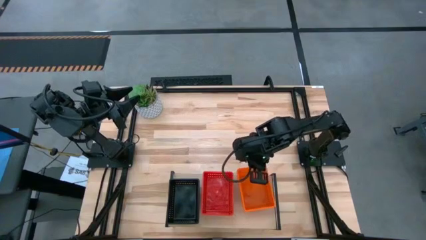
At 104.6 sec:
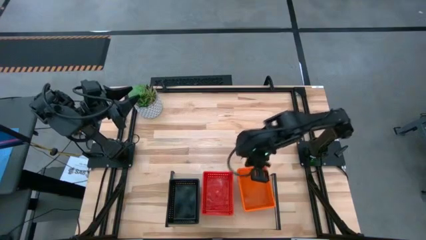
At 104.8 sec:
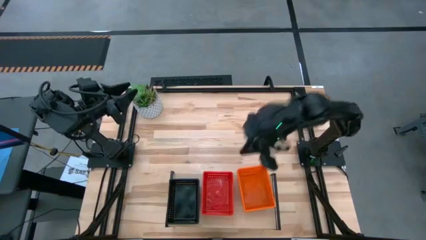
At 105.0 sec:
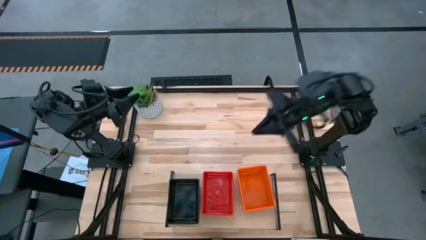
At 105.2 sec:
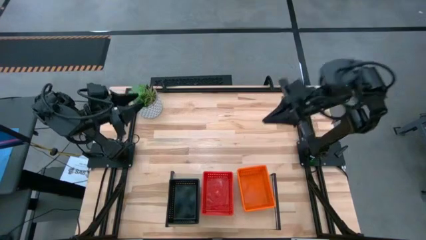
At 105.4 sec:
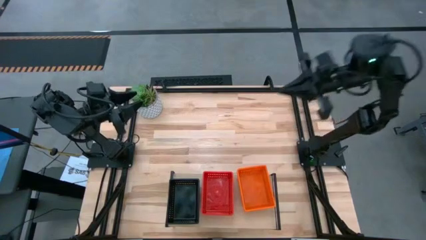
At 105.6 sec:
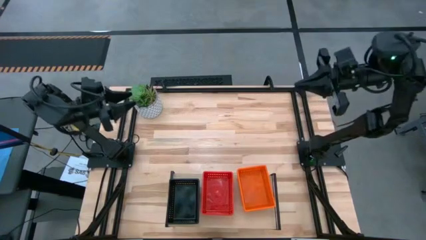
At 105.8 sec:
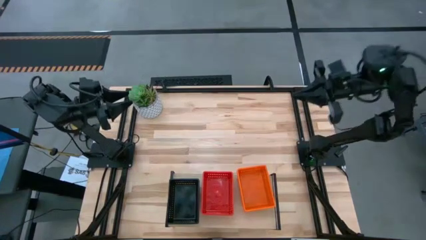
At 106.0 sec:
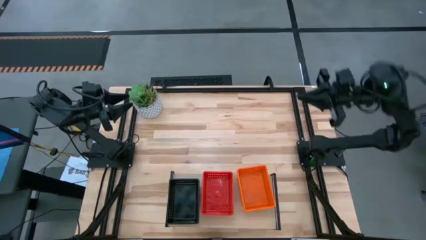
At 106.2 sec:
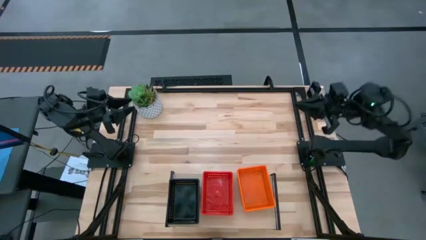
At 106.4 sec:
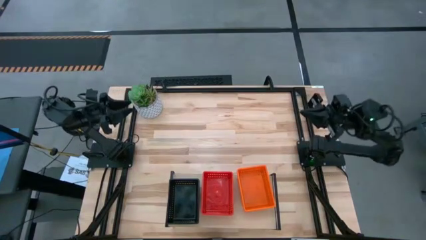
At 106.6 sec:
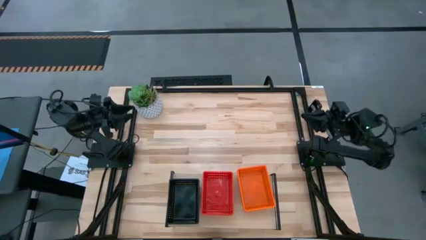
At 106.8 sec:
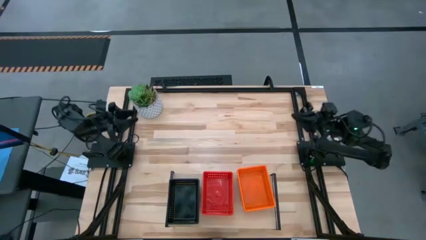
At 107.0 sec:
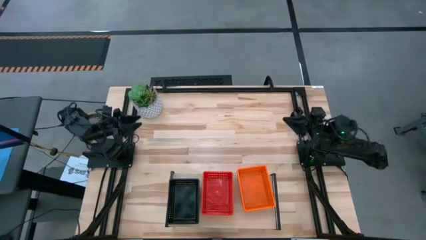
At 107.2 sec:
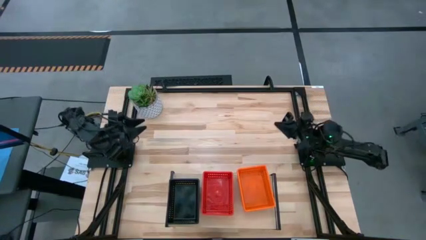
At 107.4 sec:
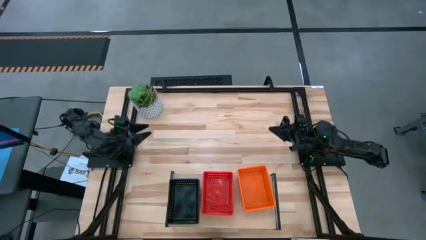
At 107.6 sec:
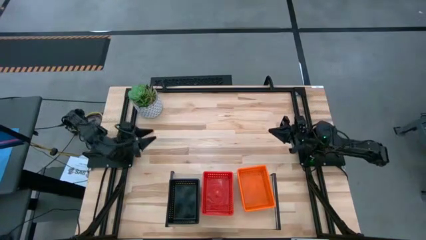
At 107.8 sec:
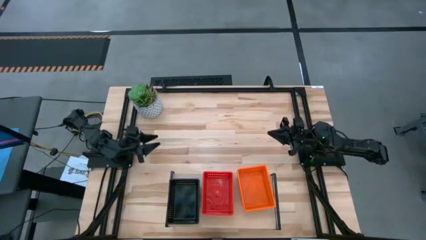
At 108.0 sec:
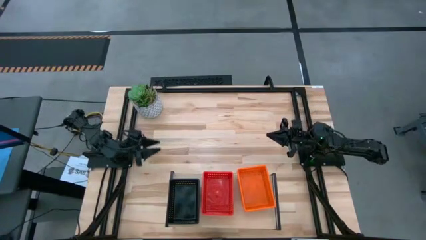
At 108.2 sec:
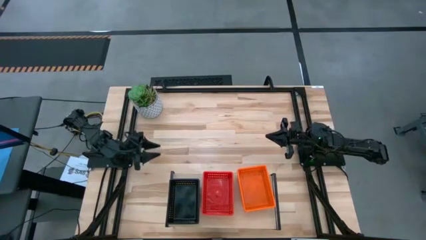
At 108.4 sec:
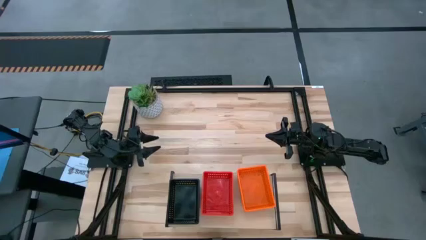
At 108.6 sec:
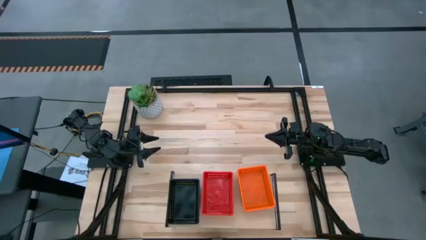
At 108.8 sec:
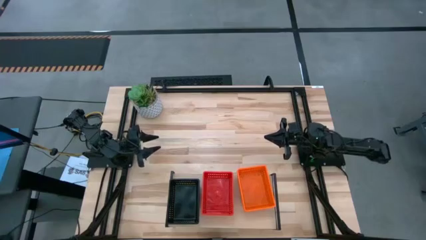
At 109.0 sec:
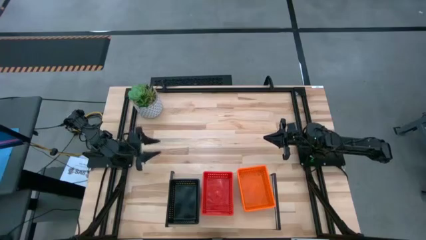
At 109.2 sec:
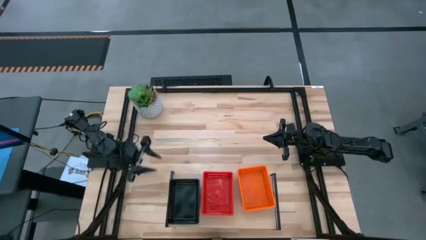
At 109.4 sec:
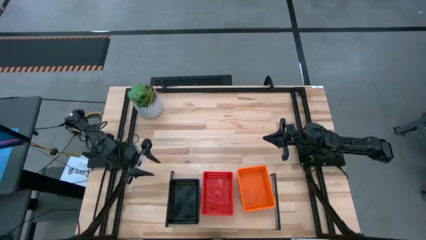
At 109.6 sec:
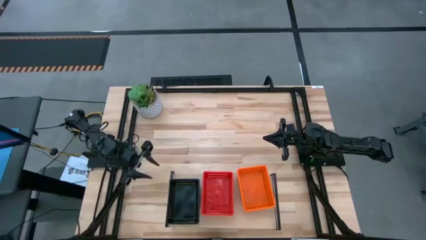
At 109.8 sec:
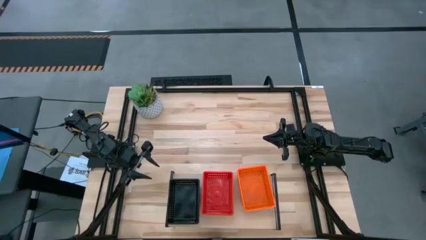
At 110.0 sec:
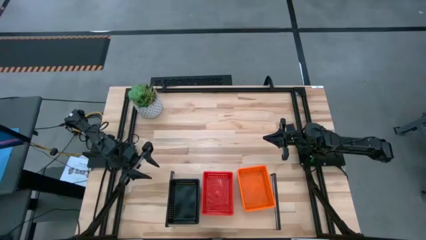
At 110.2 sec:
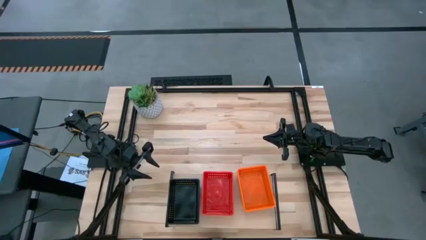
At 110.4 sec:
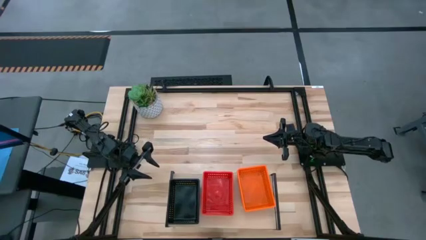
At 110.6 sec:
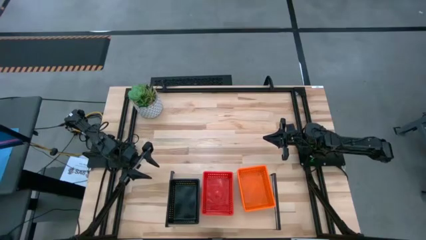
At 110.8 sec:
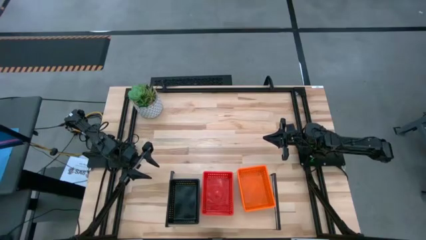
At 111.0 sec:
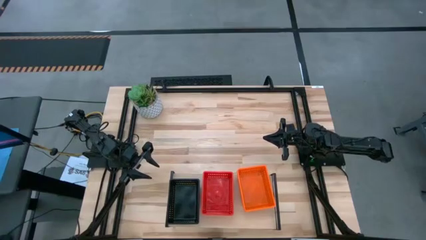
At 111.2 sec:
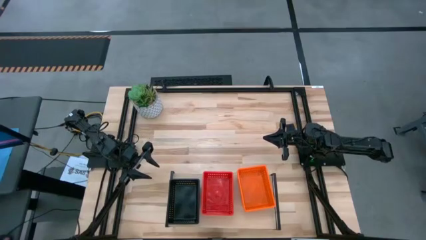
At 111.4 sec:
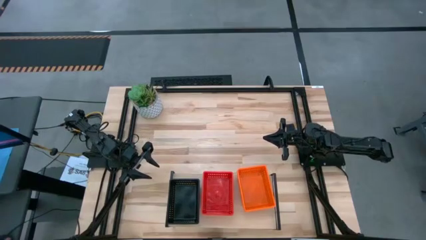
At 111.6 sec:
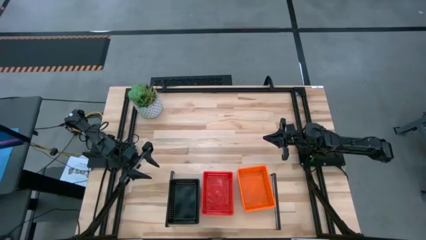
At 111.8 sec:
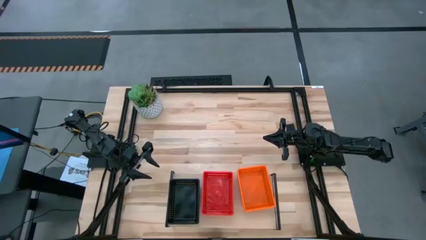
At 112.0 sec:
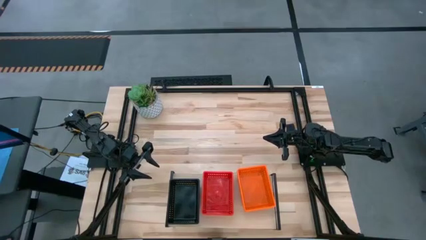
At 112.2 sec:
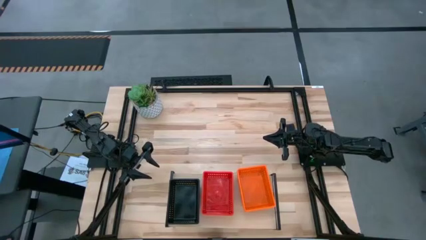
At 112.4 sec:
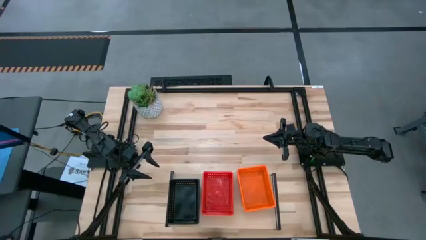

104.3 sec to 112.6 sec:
Task: Stack baskets on shelf by color
Return to Home Position

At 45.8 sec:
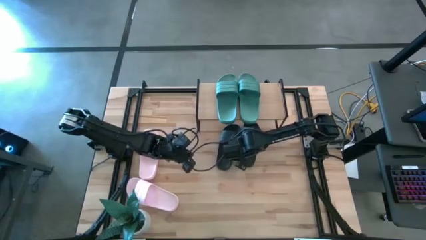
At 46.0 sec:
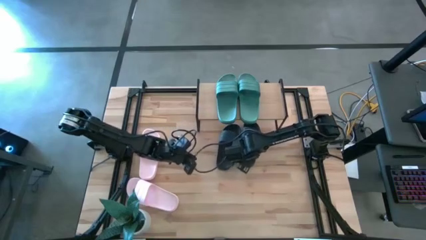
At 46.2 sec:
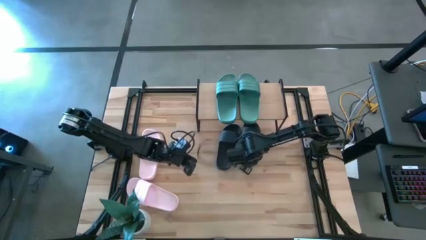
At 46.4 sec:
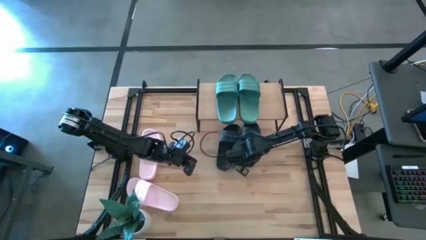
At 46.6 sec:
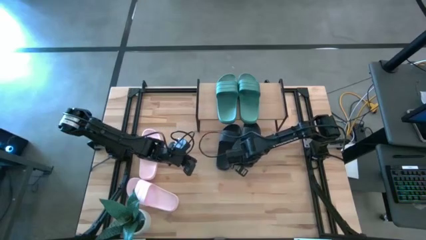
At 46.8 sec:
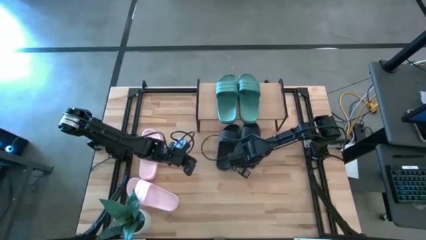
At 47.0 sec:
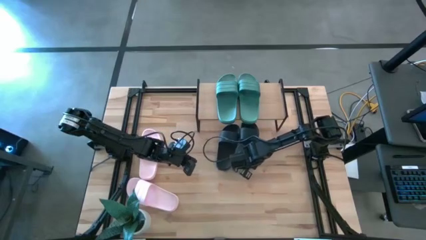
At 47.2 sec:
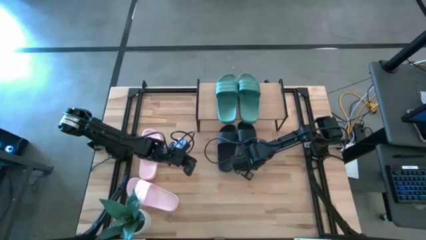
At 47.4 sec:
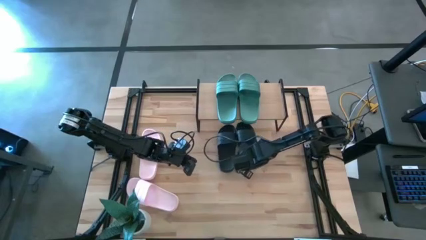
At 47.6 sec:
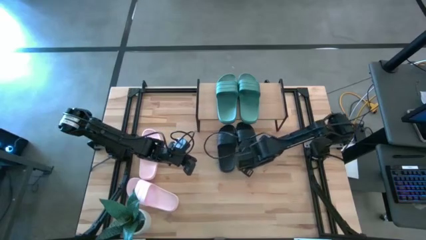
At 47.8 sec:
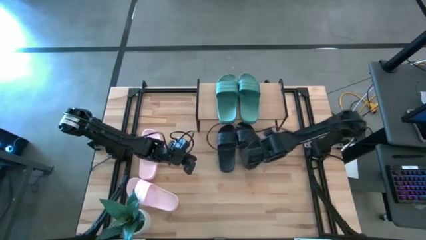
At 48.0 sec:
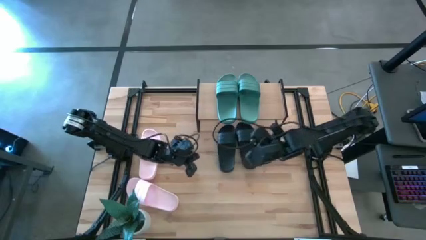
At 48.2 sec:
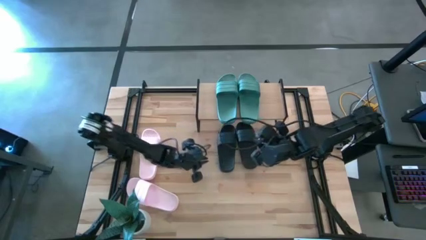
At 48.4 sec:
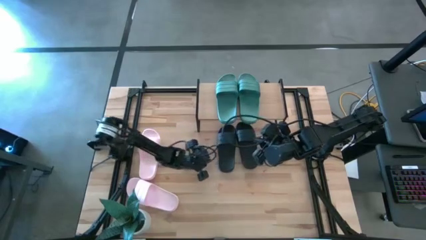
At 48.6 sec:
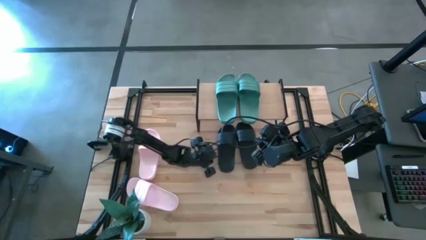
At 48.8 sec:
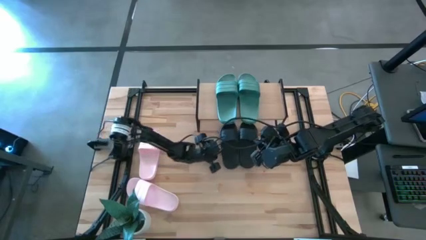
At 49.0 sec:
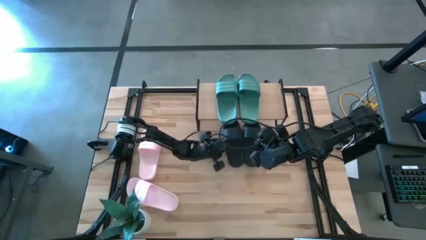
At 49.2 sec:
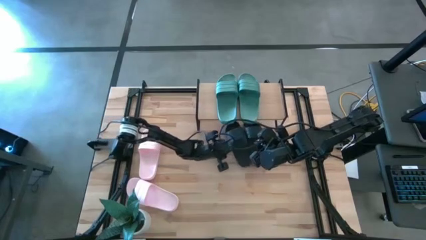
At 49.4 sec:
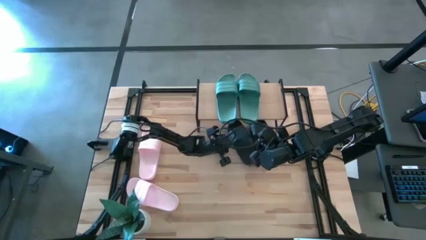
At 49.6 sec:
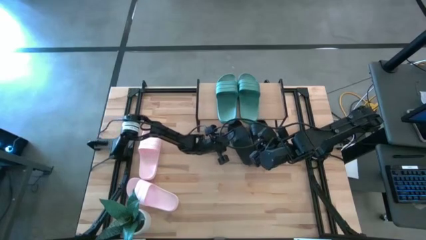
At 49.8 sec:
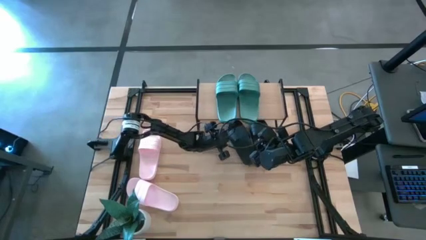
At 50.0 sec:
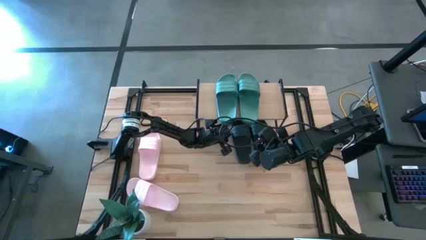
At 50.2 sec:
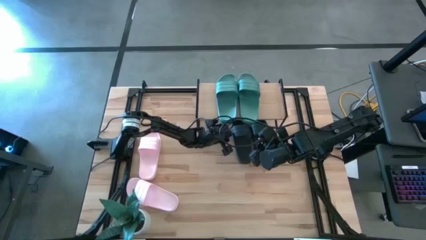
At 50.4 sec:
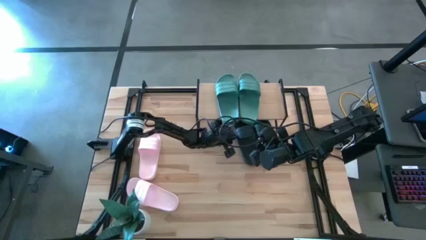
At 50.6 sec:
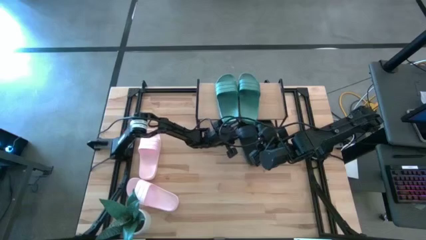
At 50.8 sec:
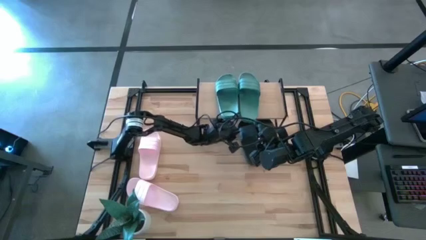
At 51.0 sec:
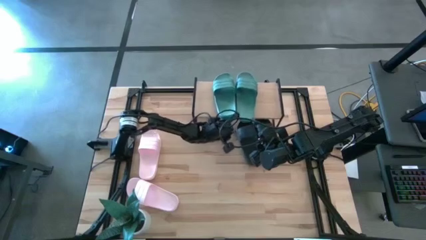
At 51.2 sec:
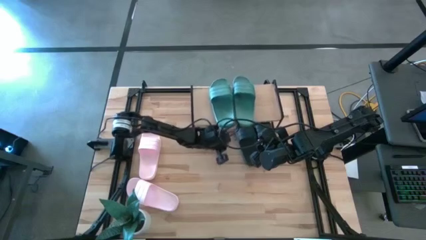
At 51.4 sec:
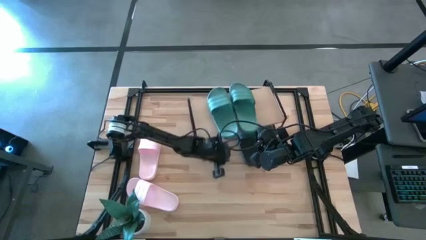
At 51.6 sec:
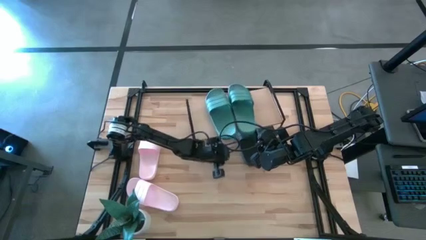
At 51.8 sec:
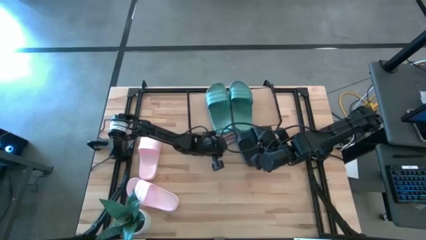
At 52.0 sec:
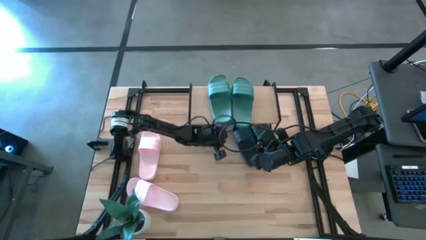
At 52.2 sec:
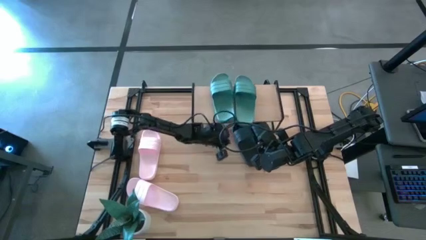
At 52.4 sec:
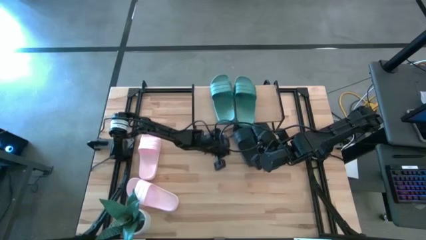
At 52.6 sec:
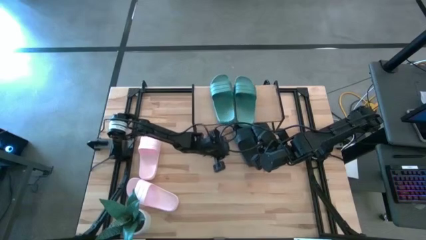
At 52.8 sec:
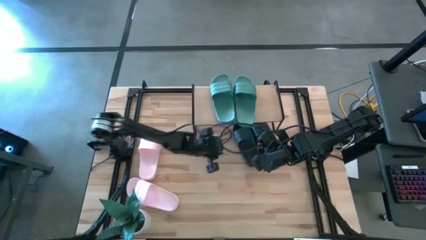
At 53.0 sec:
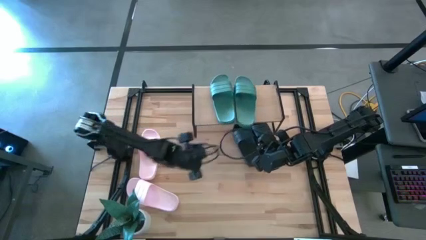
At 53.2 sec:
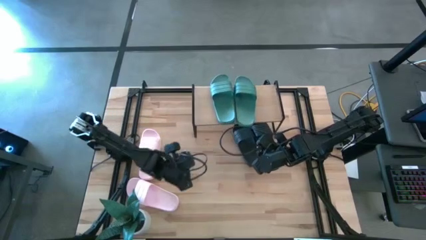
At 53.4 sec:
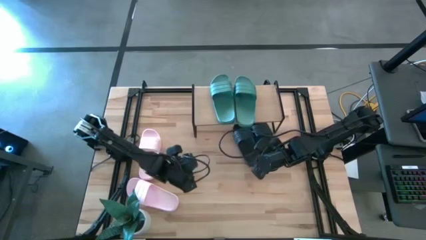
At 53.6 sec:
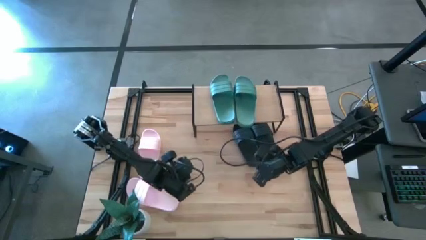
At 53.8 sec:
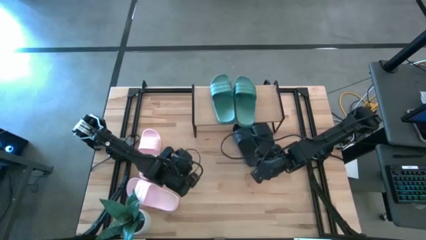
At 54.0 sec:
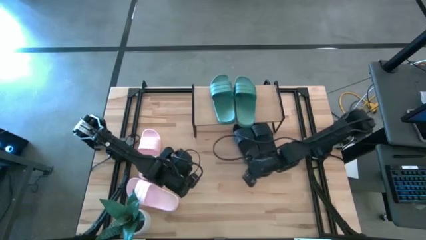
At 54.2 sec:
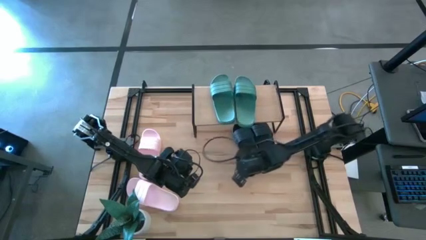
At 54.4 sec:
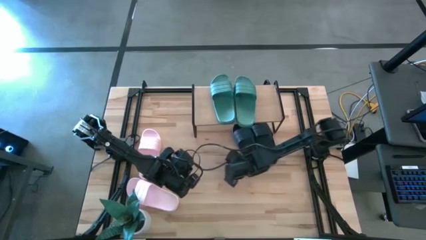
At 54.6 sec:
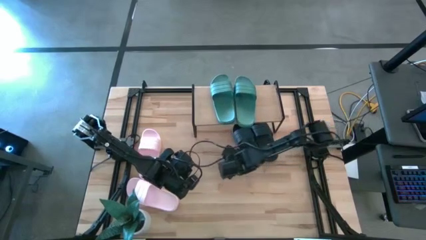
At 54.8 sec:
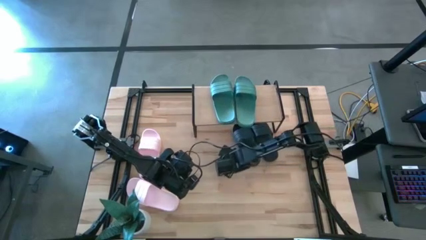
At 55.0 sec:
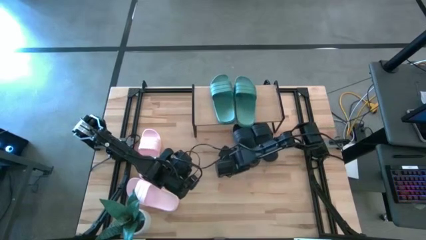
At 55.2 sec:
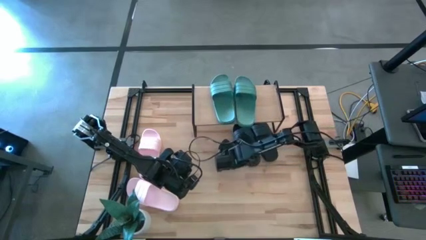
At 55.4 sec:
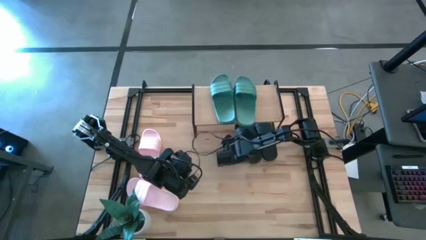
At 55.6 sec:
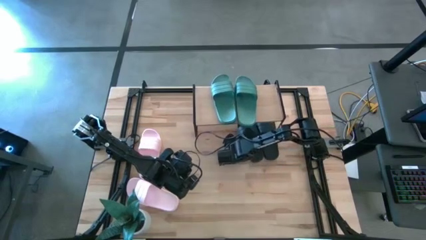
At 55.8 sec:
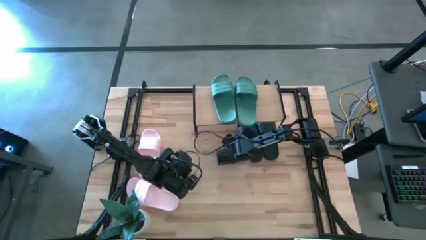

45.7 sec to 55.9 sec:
Task: Pick and place slides into the shelf
Adjust the black slide on the shelf
